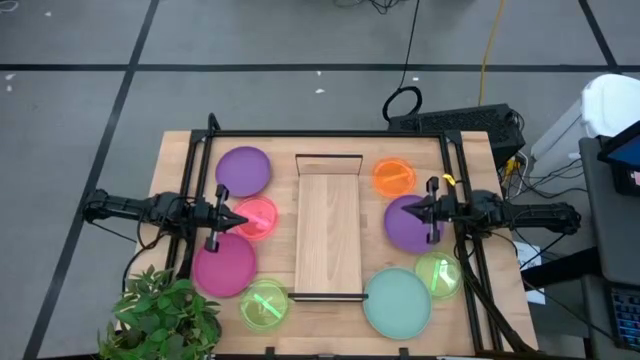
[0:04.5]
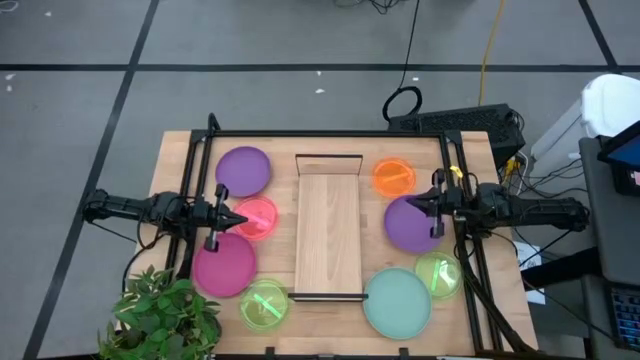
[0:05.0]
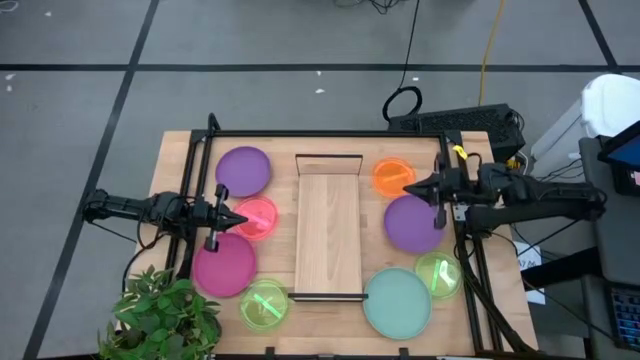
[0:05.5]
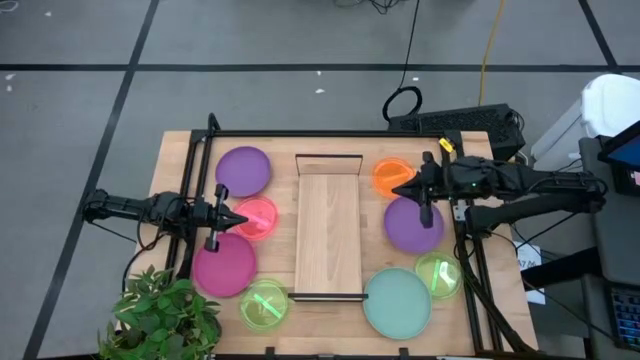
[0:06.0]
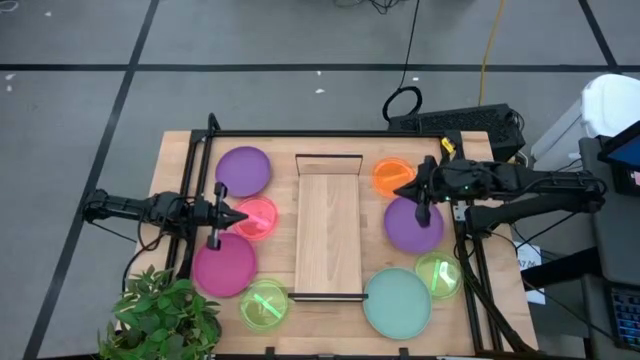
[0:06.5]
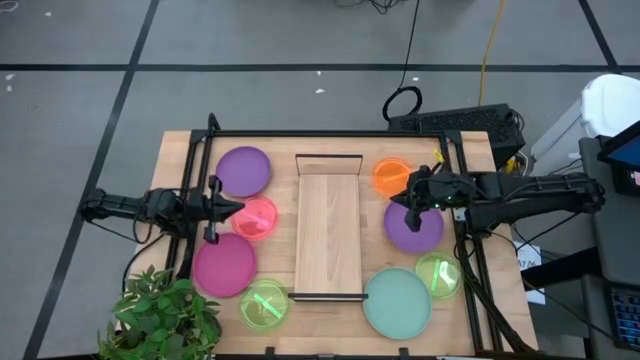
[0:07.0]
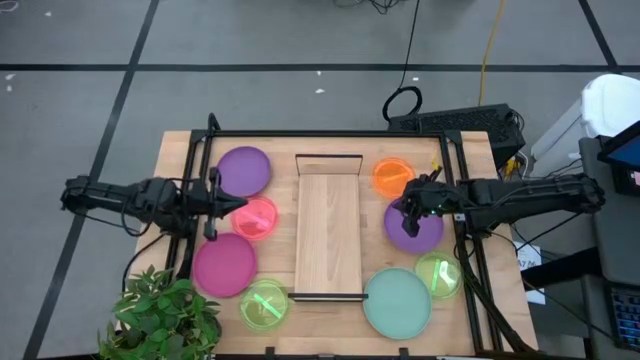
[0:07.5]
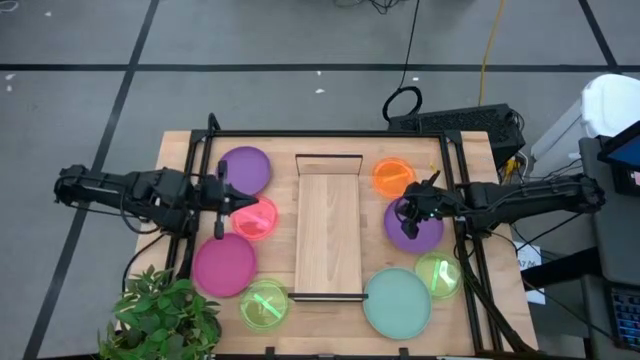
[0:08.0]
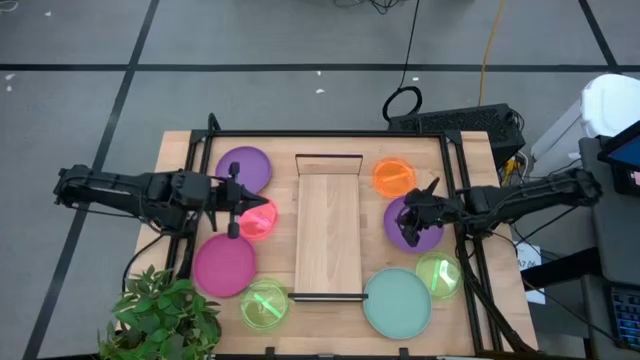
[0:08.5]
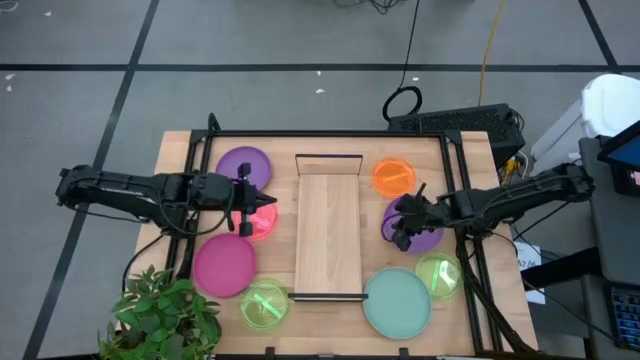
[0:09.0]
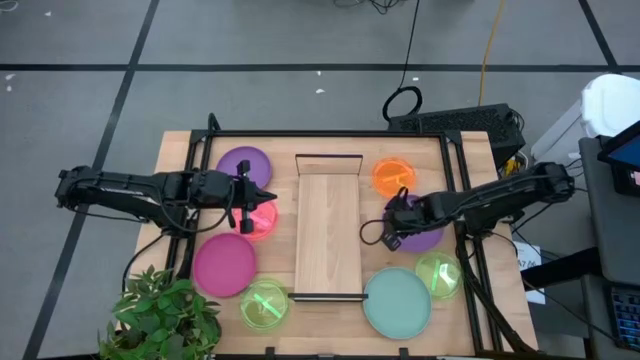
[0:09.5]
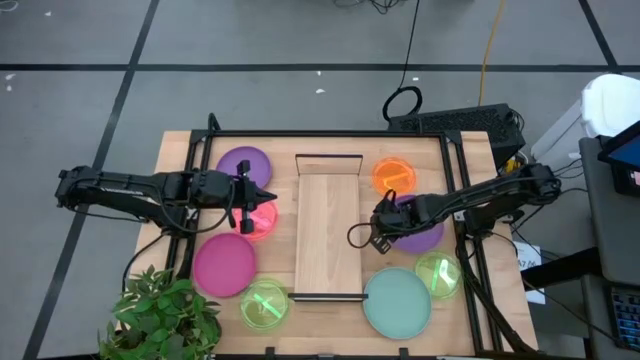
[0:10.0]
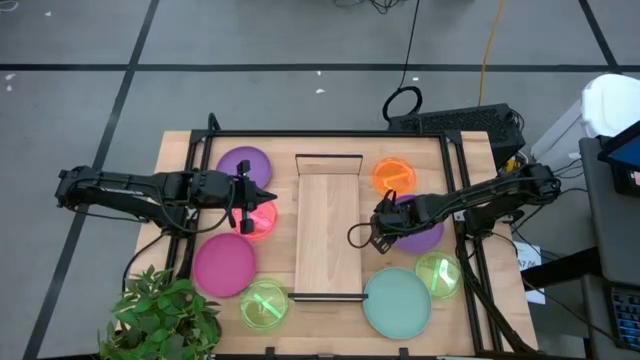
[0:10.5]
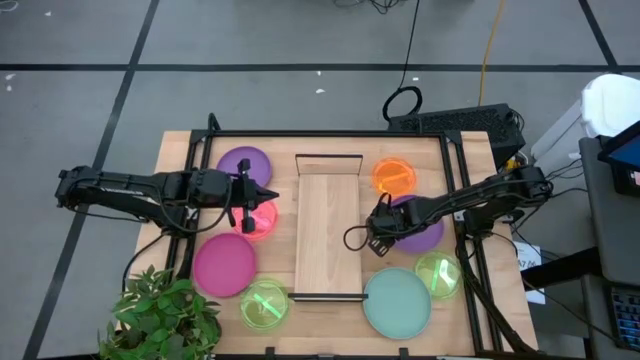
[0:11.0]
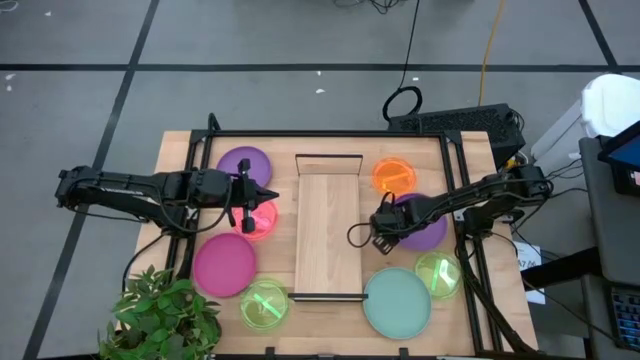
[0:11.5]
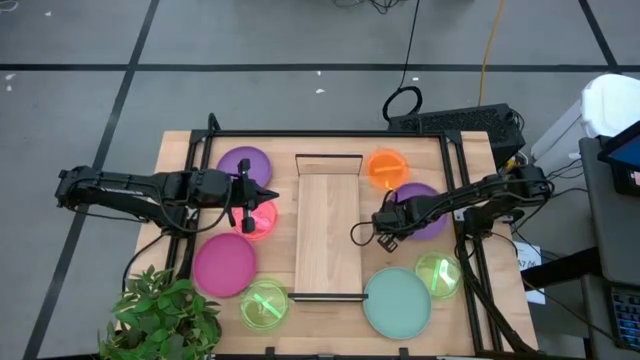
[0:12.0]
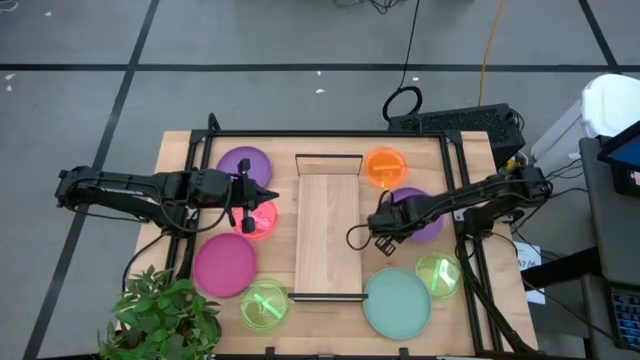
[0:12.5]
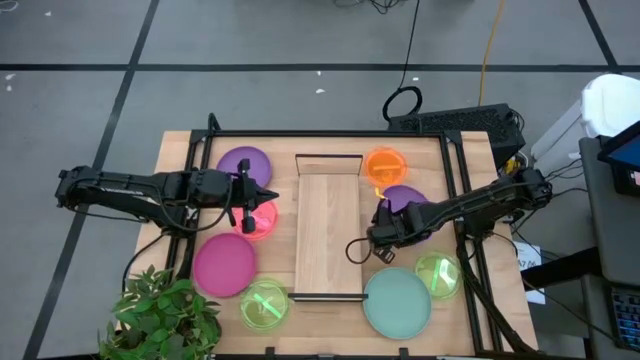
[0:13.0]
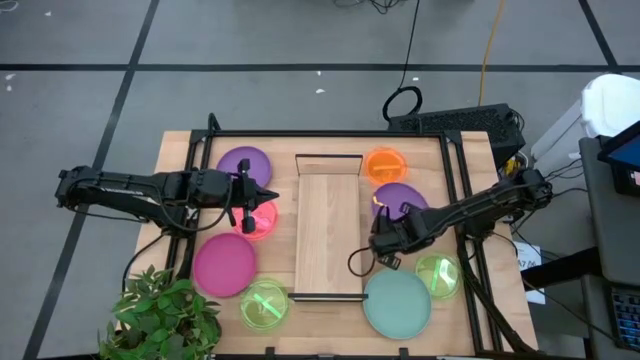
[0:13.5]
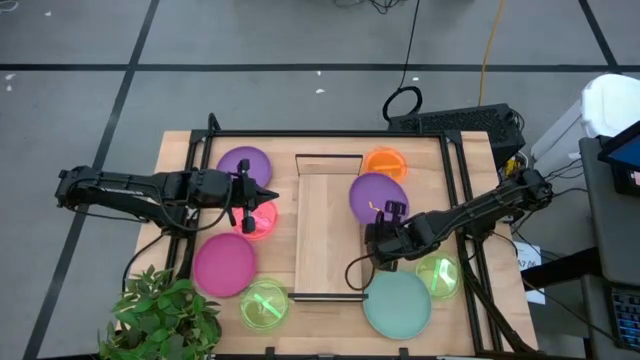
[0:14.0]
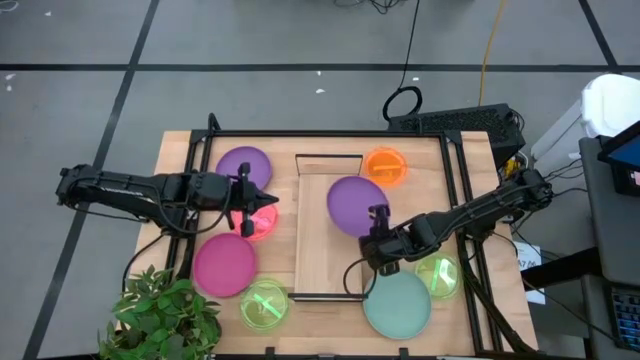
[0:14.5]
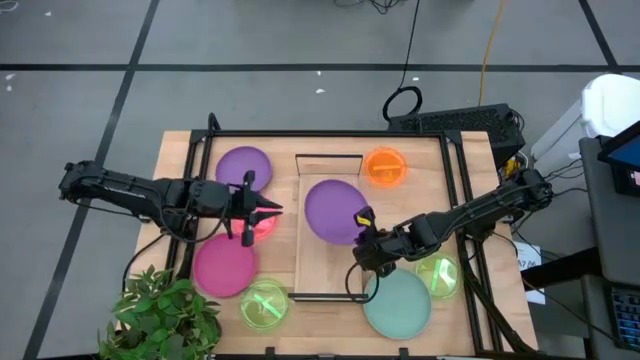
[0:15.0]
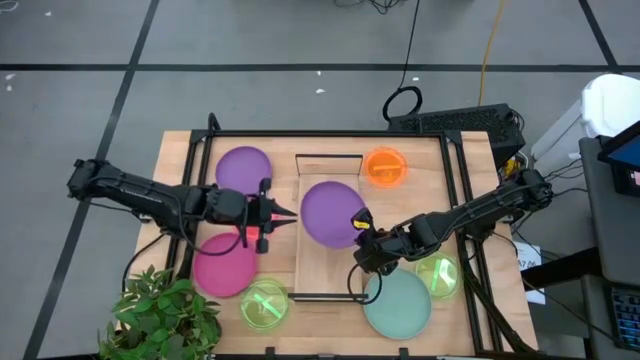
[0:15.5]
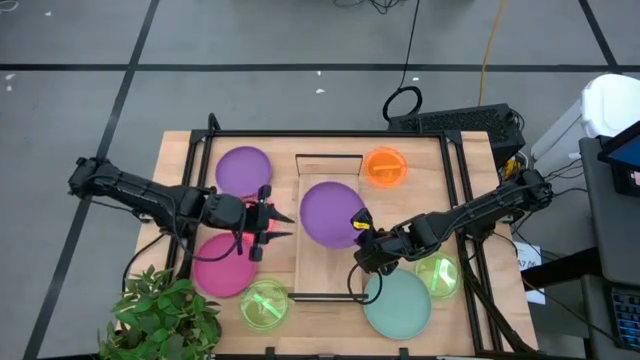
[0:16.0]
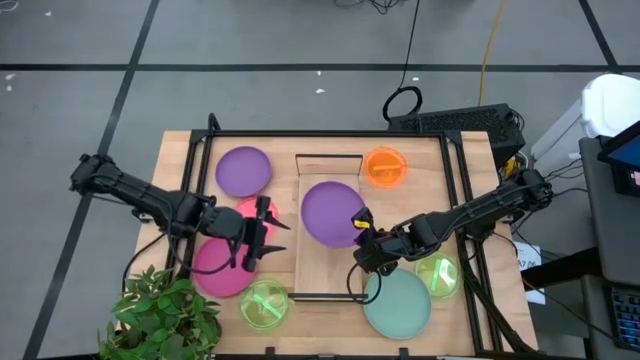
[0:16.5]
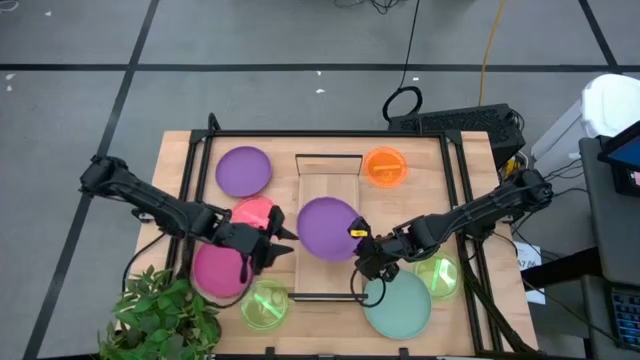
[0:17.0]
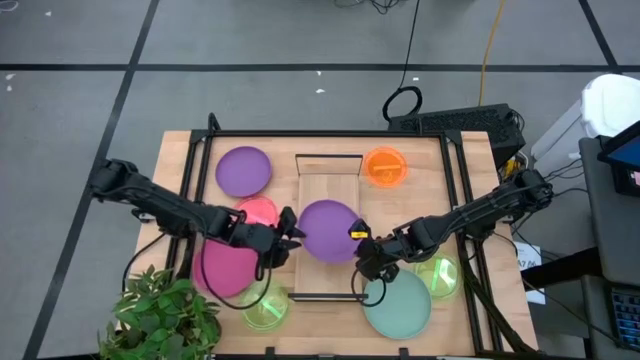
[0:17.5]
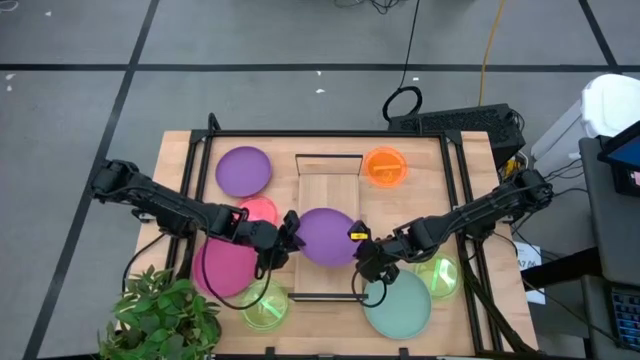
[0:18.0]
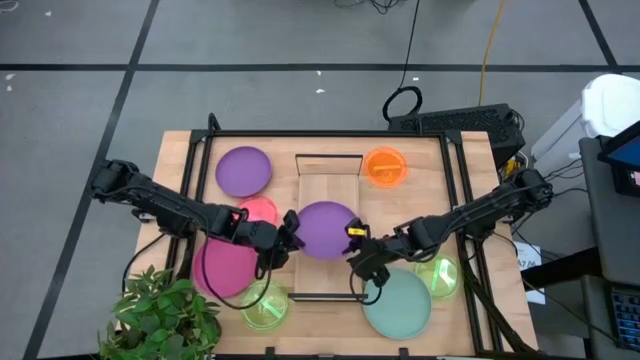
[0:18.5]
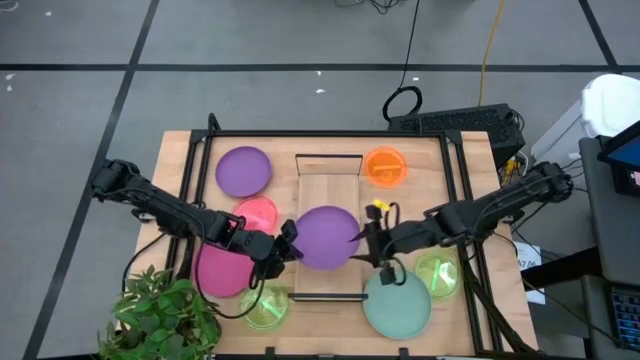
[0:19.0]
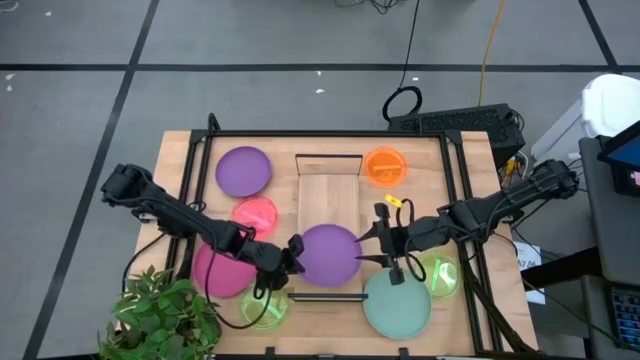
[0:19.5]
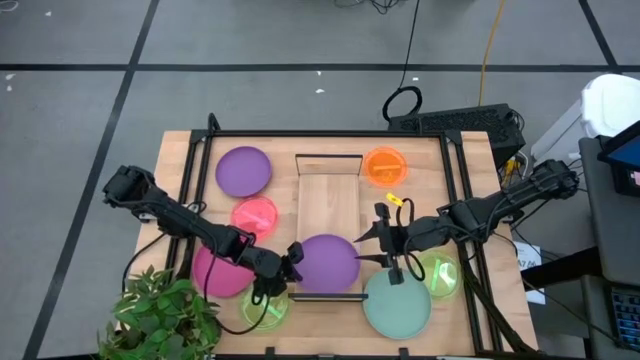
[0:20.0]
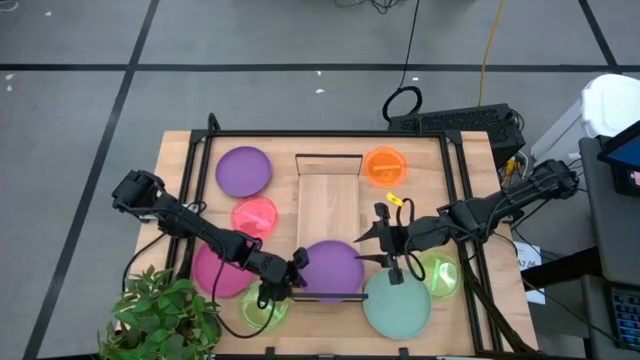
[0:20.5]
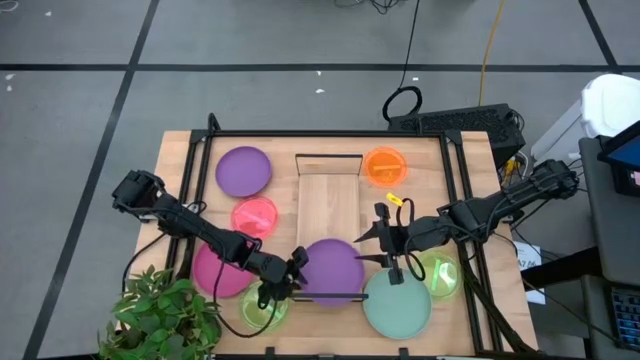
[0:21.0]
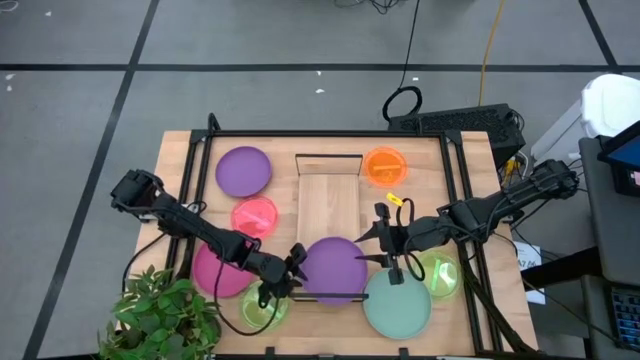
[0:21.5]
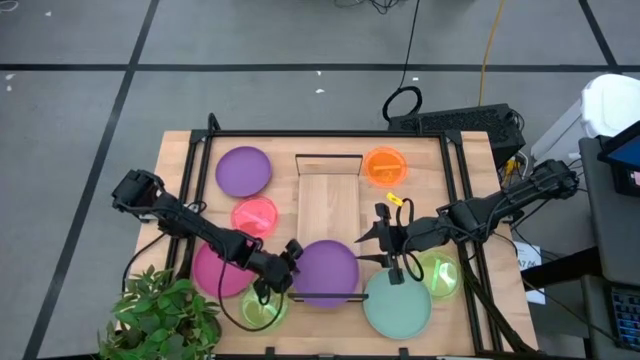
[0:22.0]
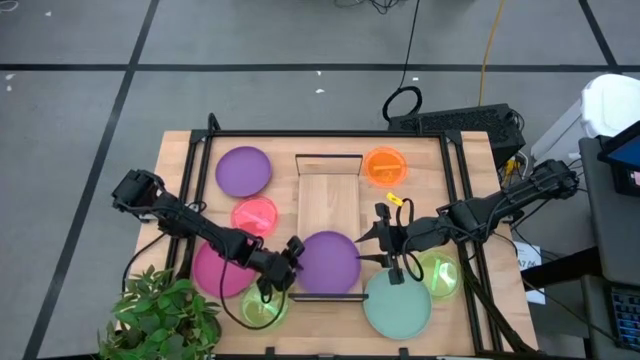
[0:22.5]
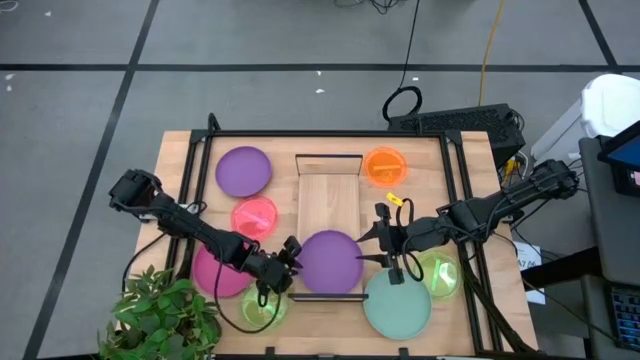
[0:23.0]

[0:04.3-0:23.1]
Task: Place and stack plates onto a shelf
Put the right large purple plate on the shelf
